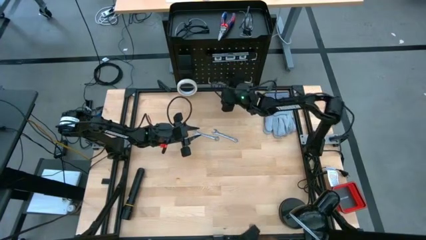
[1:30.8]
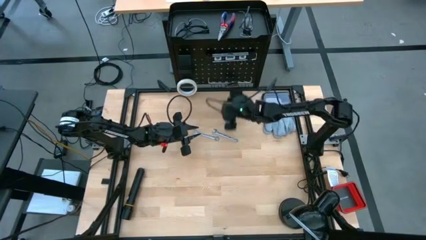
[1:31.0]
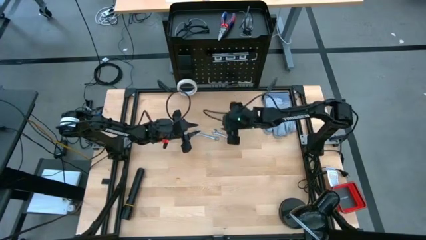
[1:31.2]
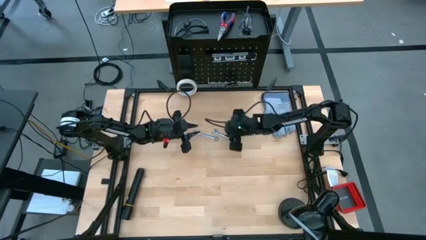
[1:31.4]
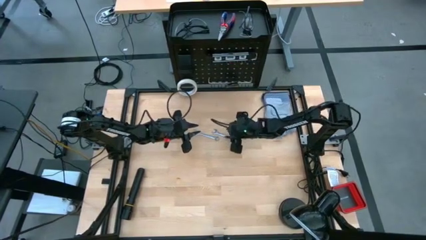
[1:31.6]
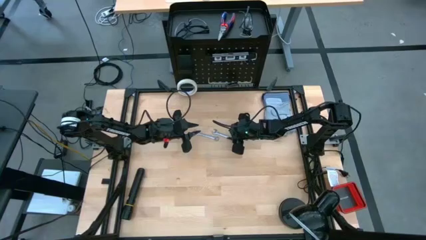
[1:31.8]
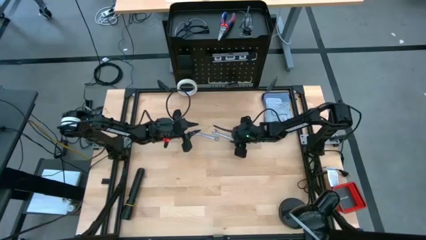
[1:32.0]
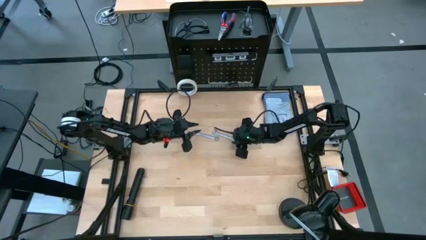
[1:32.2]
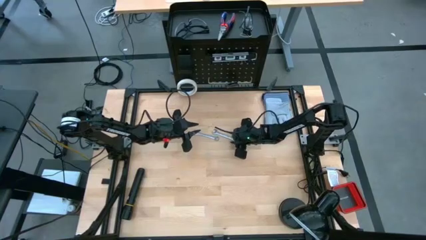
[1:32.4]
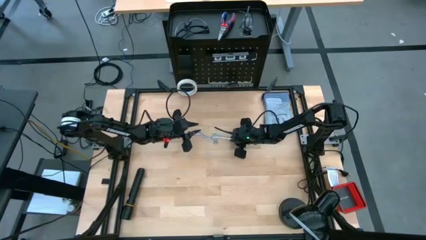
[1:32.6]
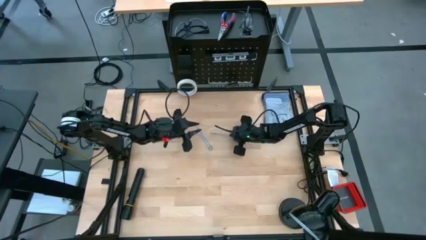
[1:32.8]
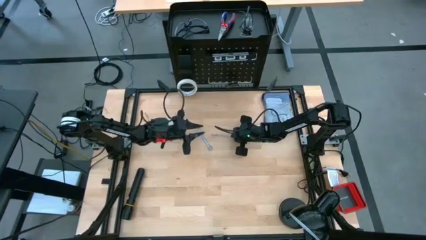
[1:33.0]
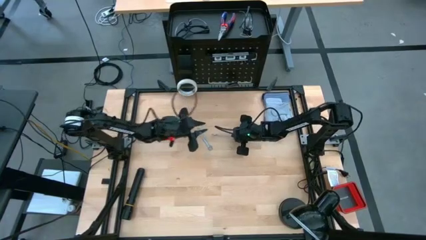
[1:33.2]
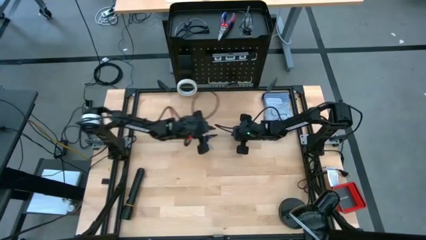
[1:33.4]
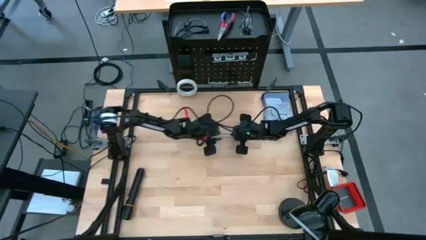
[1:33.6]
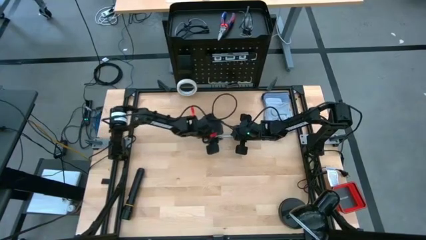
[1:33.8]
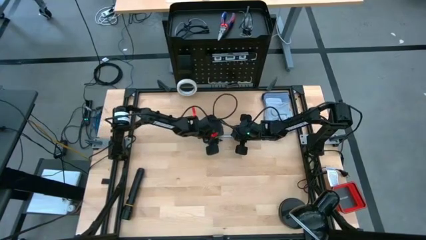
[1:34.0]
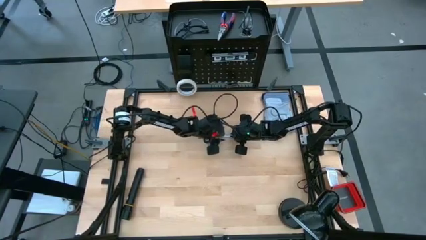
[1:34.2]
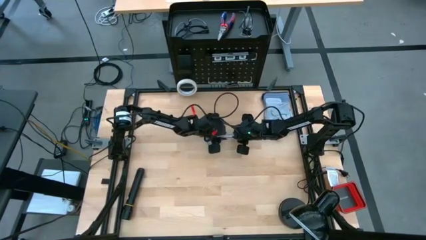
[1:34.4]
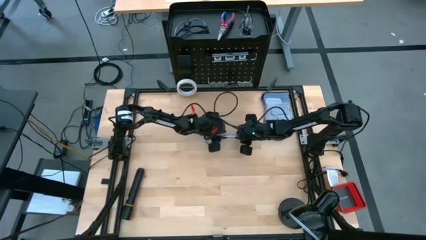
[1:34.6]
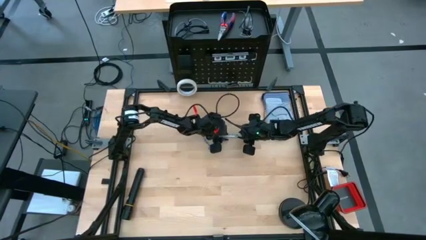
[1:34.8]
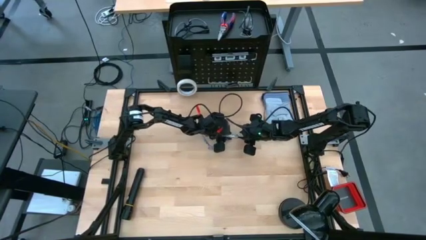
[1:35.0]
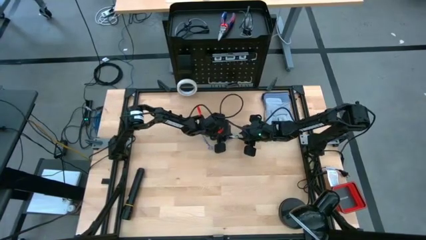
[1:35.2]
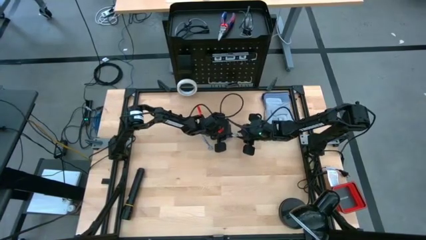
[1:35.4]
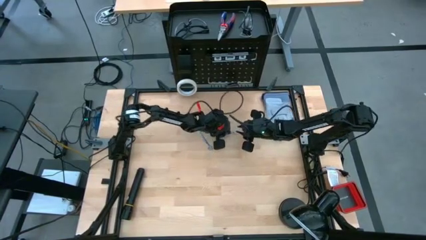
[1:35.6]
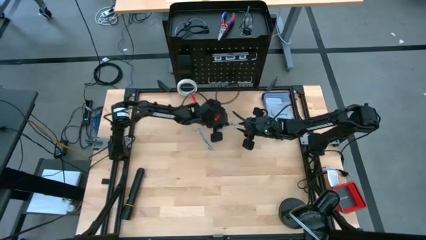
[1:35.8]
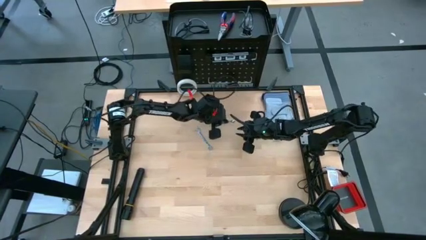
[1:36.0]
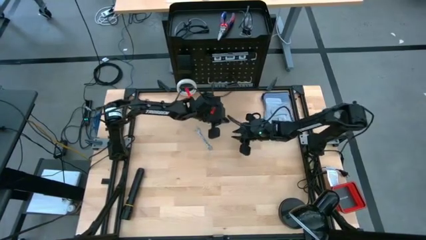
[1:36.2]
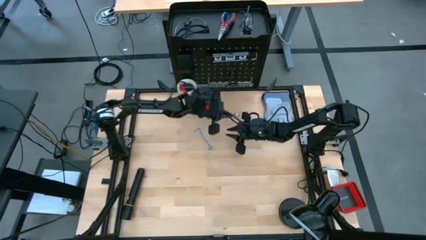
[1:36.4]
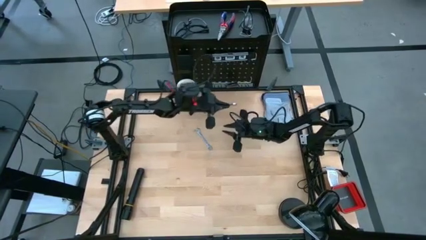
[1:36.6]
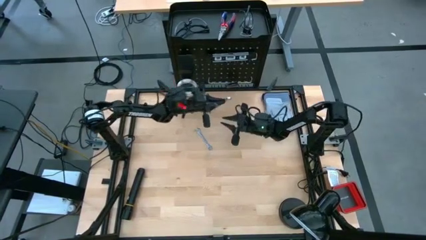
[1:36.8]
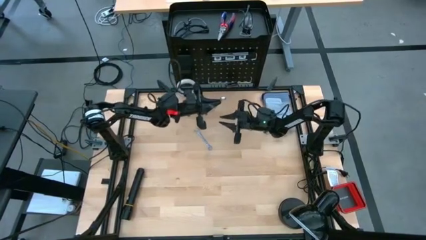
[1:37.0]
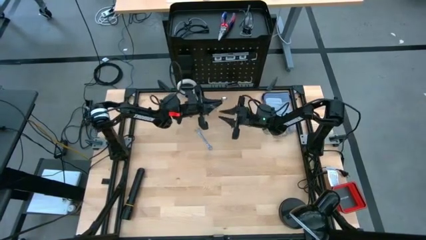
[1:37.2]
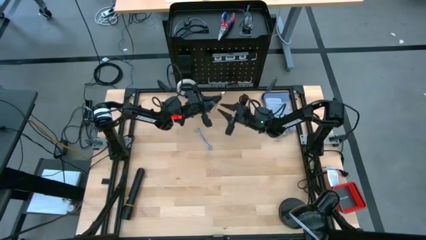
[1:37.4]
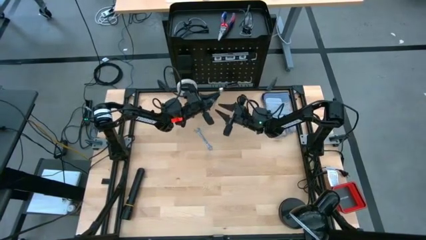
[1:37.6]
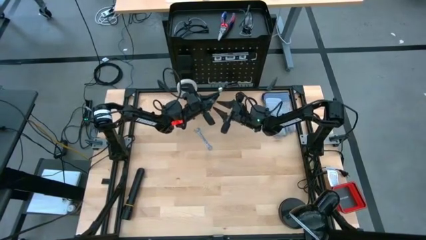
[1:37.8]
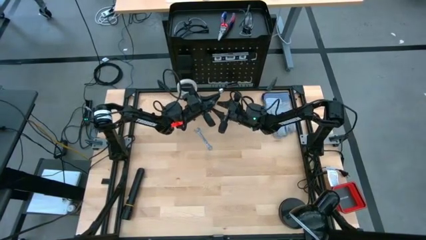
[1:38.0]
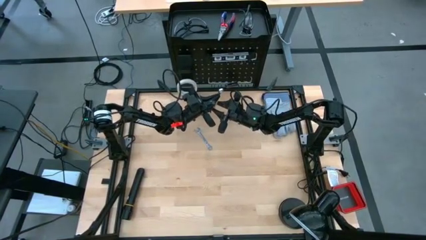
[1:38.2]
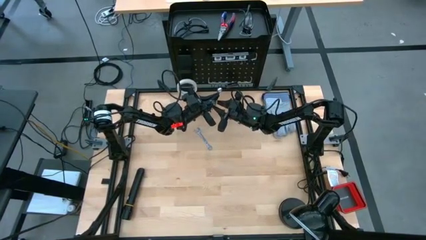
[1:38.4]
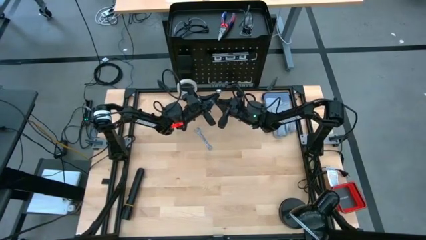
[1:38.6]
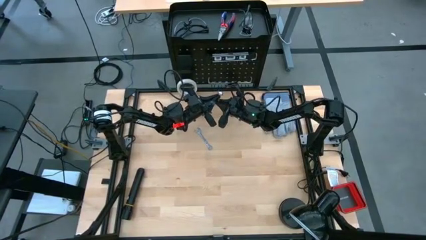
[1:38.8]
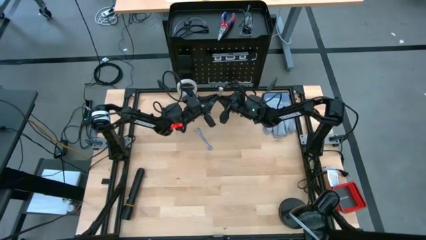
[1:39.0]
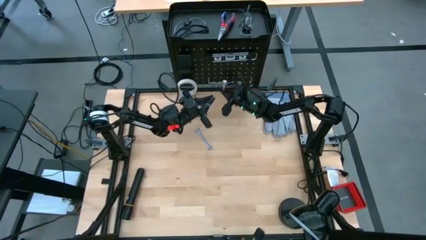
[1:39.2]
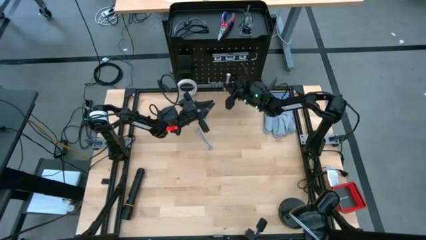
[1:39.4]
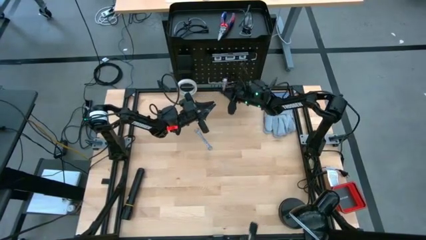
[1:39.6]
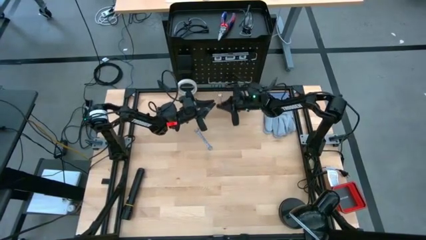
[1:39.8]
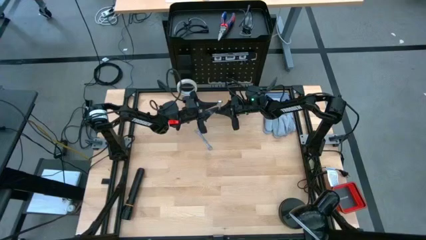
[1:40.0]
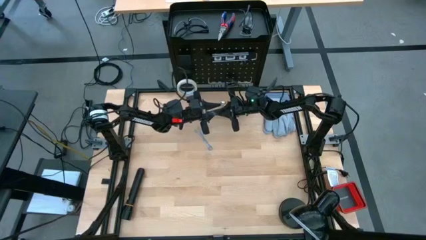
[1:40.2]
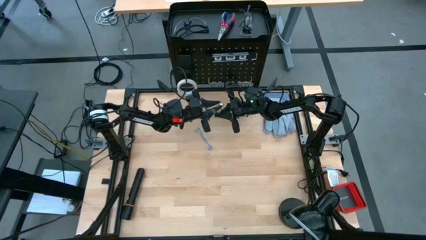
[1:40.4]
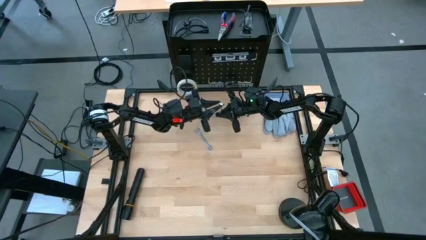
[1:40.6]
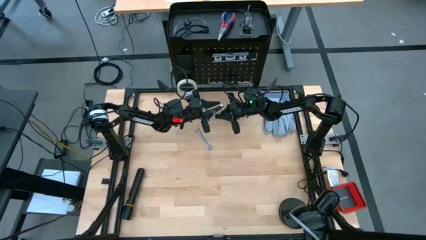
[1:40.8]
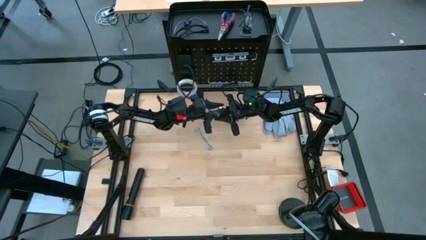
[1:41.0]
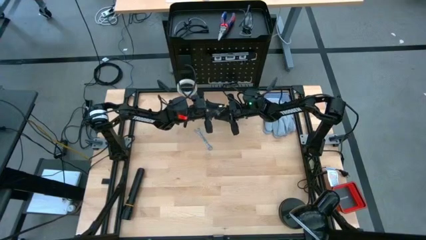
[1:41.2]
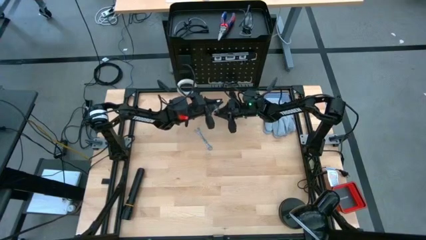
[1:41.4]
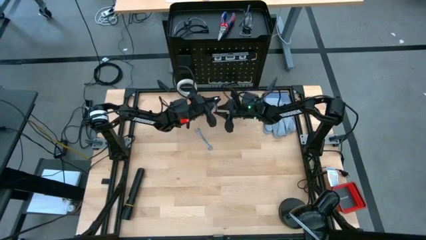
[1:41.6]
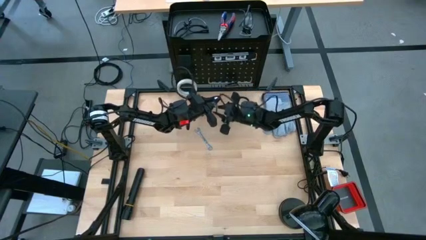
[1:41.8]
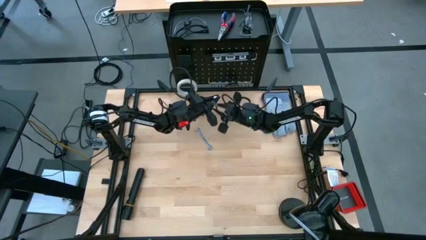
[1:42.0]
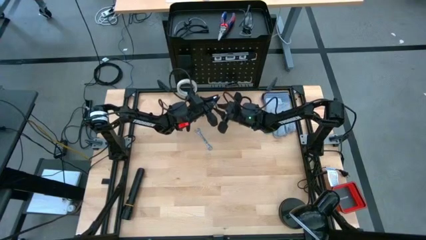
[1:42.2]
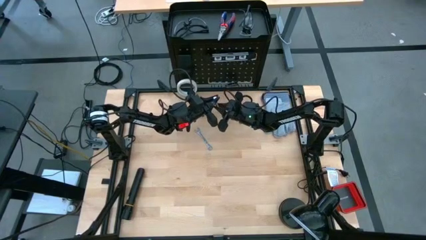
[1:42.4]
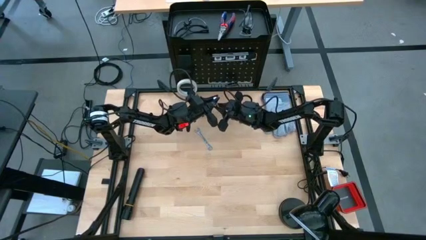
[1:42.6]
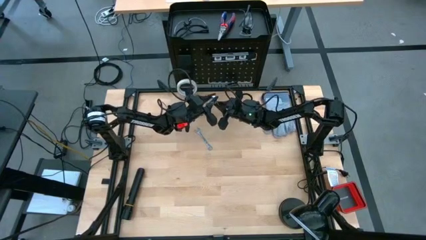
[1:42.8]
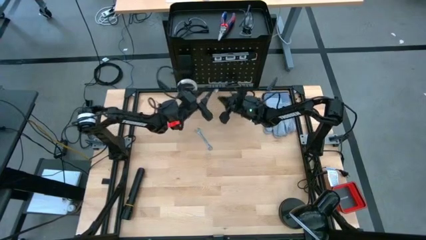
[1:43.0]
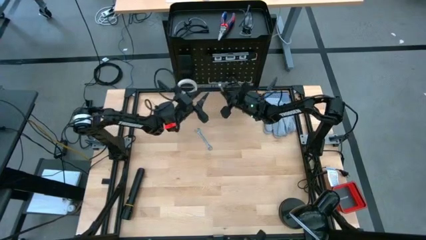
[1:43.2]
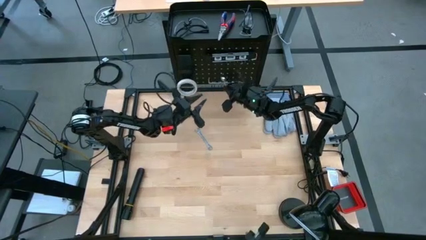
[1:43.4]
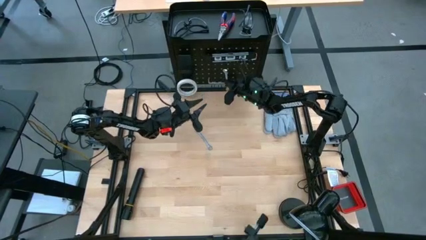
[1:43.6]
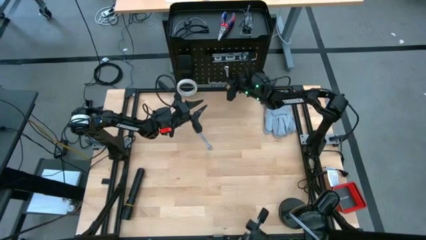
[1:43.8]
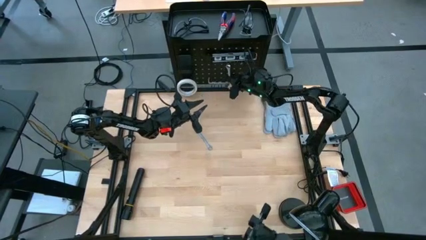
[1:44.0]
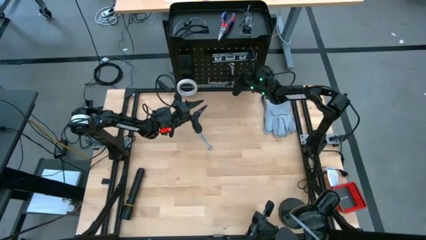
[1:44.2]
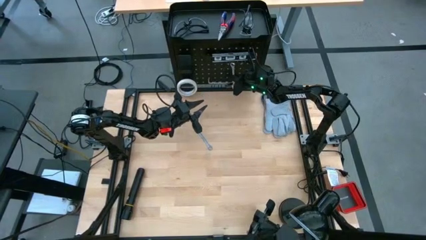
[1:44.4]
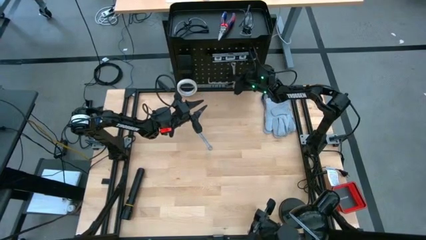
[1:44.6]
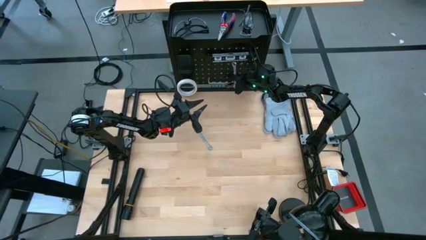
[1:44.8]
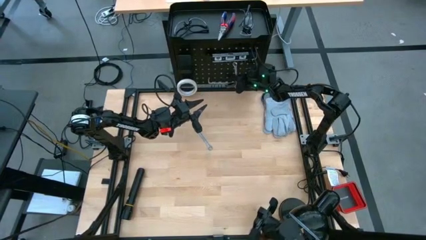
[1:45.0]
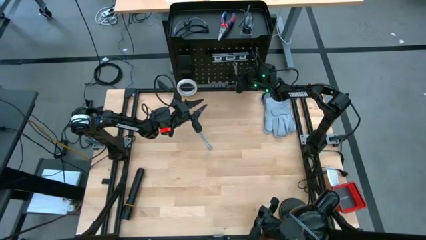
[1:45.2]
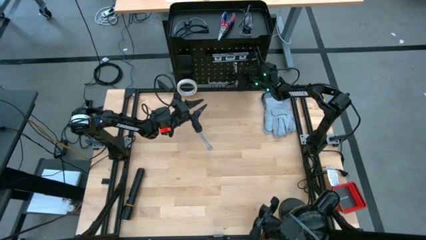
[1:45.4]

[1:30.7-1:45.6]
Task: Hang tools onto peg board
Hang the right silver wrench on the black pegboard
